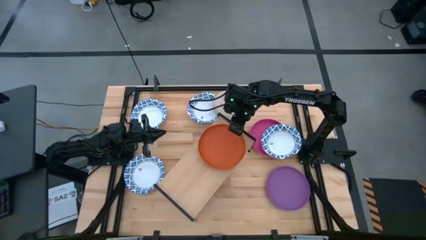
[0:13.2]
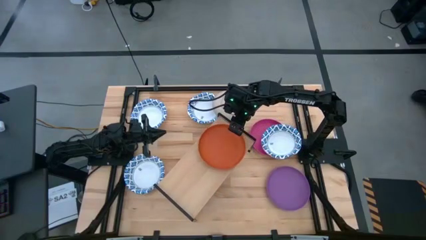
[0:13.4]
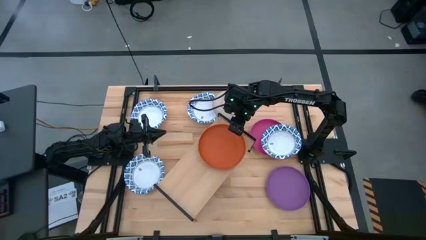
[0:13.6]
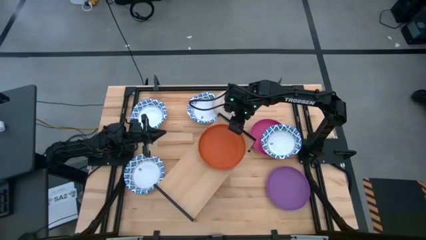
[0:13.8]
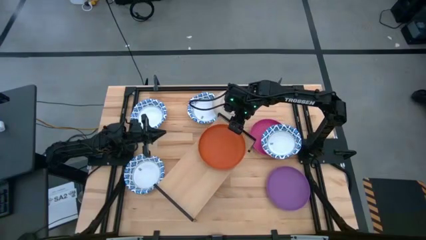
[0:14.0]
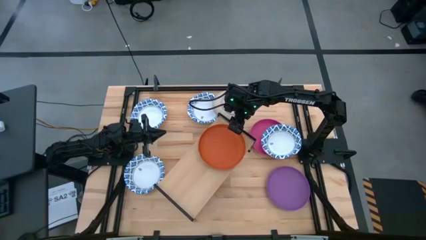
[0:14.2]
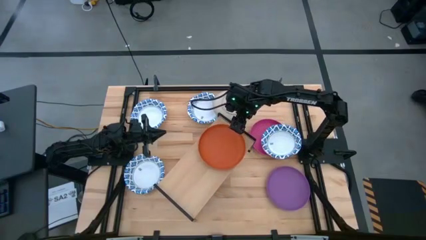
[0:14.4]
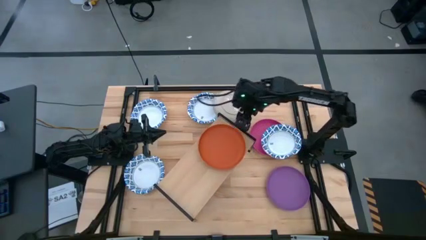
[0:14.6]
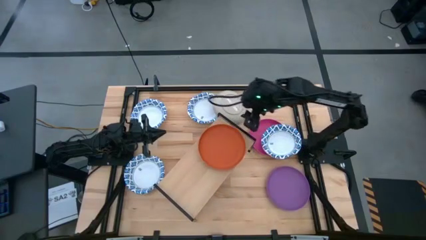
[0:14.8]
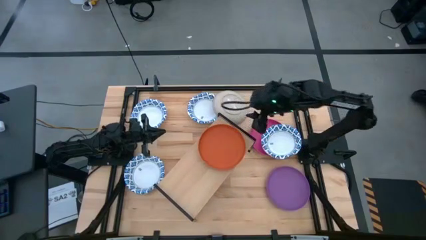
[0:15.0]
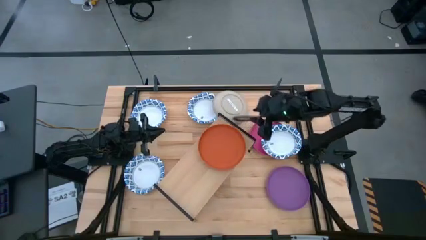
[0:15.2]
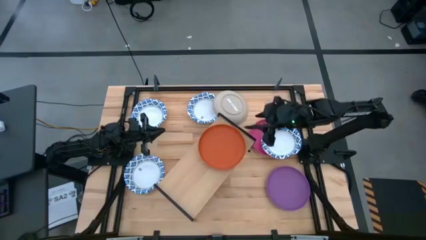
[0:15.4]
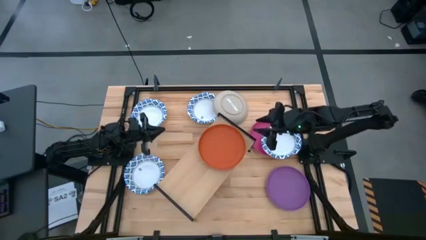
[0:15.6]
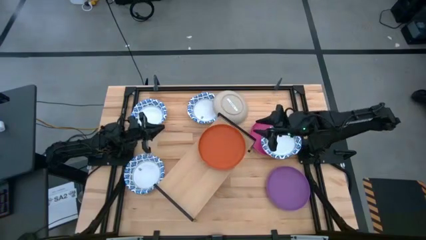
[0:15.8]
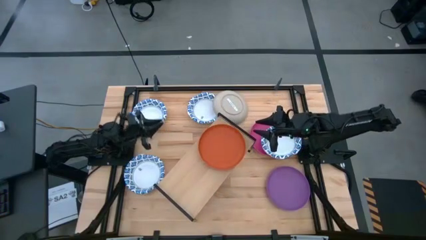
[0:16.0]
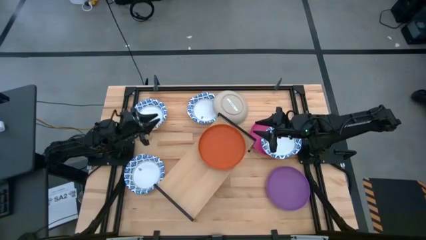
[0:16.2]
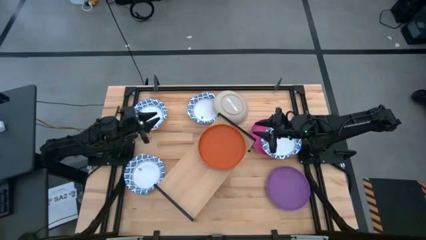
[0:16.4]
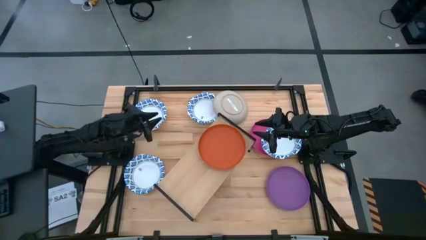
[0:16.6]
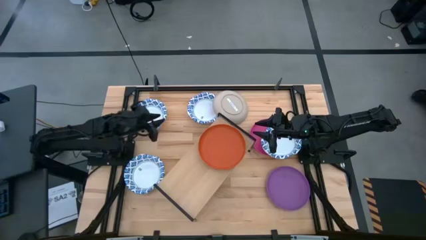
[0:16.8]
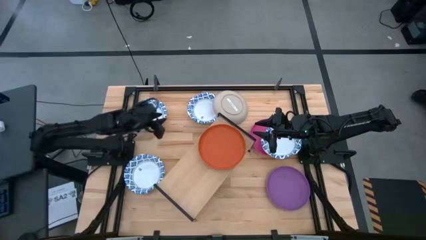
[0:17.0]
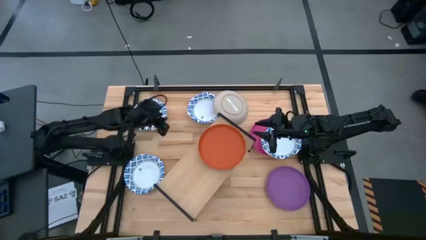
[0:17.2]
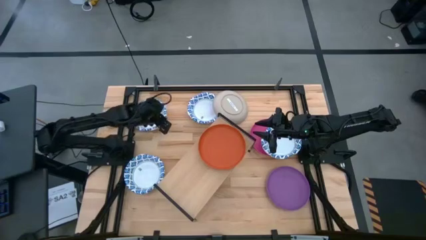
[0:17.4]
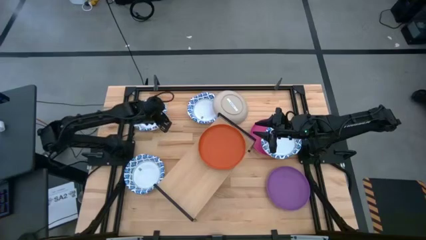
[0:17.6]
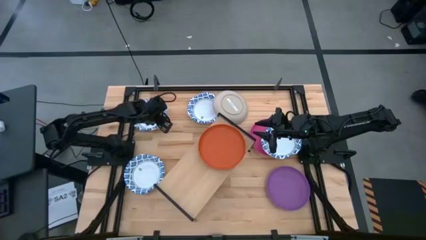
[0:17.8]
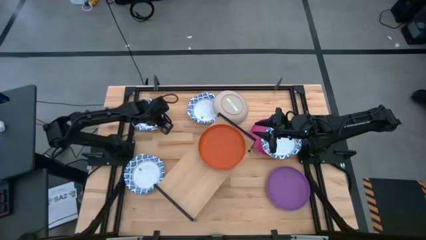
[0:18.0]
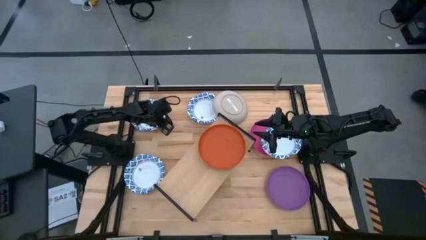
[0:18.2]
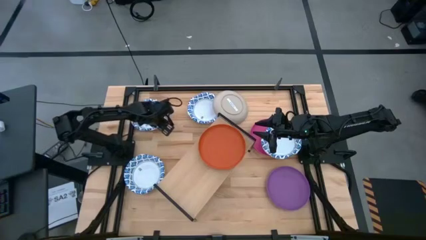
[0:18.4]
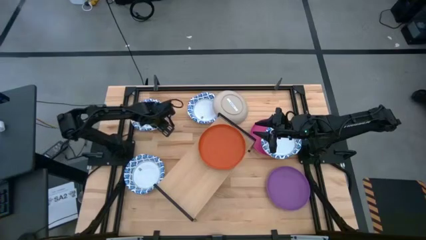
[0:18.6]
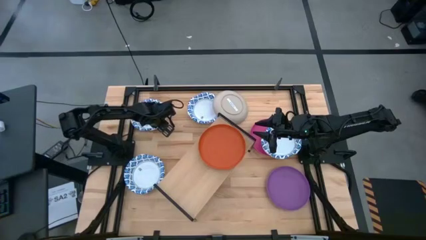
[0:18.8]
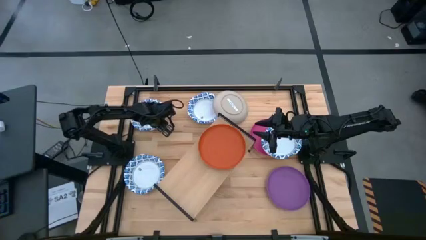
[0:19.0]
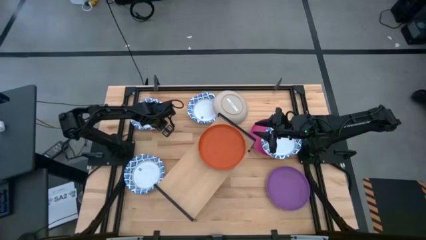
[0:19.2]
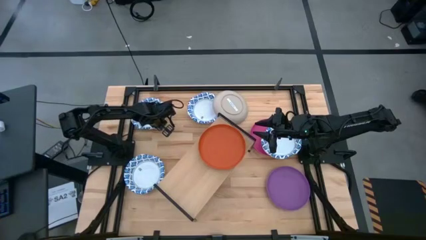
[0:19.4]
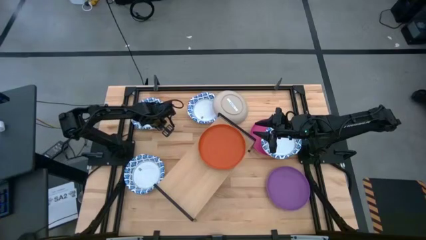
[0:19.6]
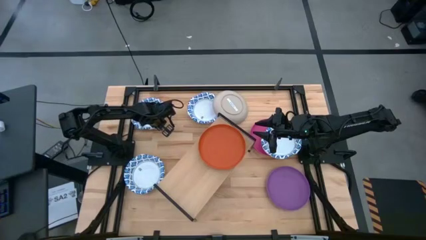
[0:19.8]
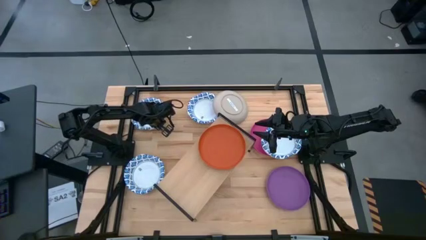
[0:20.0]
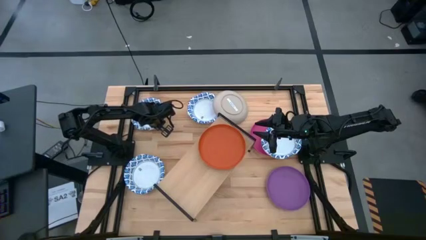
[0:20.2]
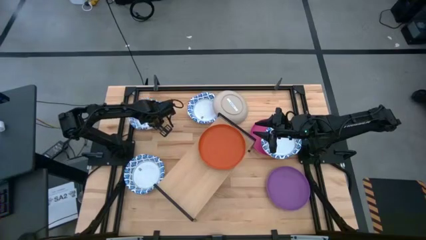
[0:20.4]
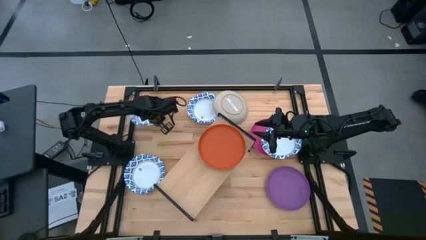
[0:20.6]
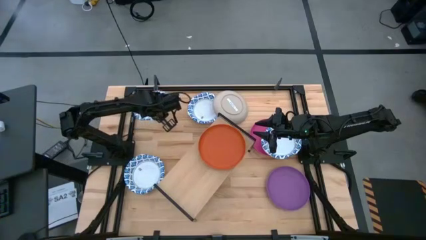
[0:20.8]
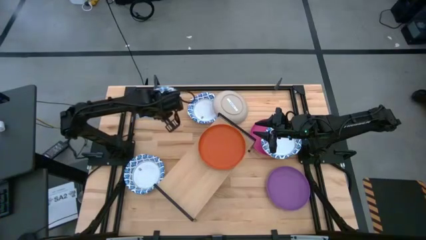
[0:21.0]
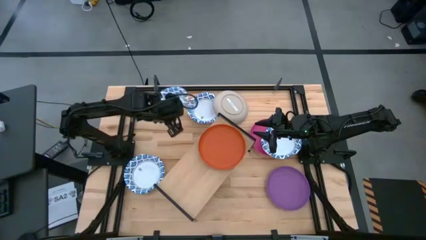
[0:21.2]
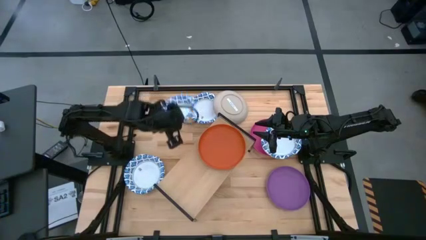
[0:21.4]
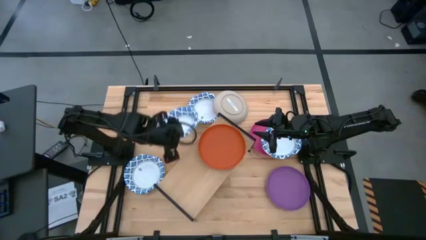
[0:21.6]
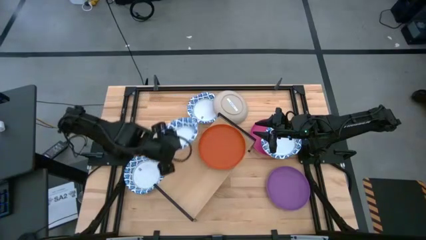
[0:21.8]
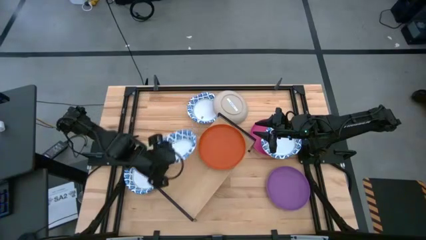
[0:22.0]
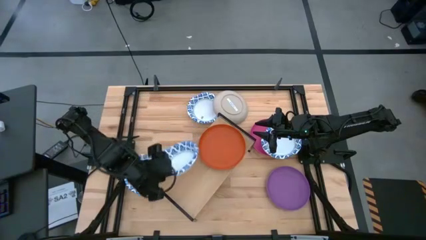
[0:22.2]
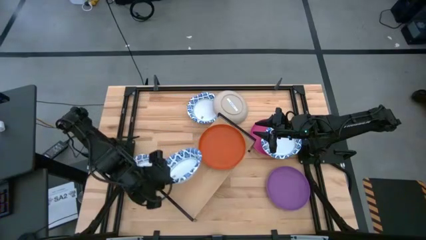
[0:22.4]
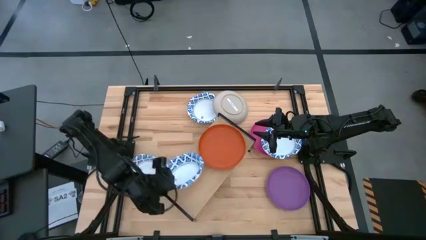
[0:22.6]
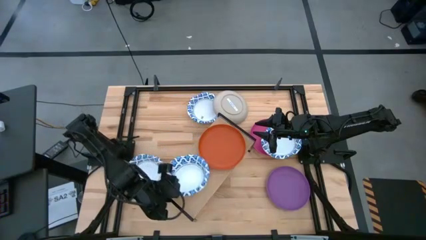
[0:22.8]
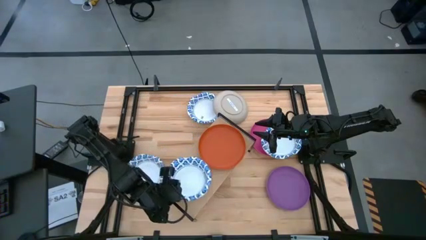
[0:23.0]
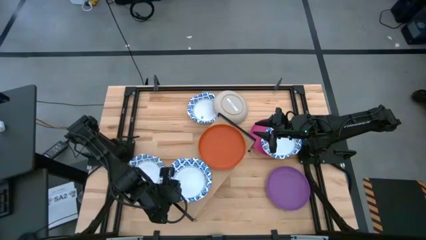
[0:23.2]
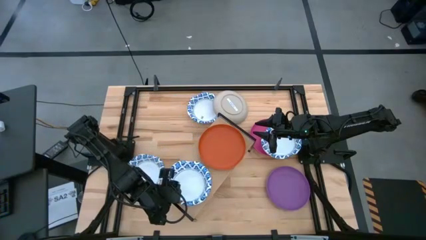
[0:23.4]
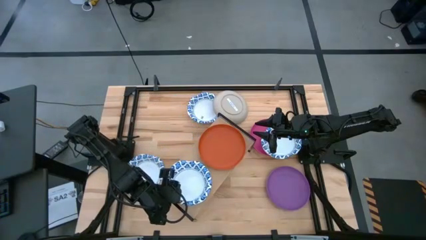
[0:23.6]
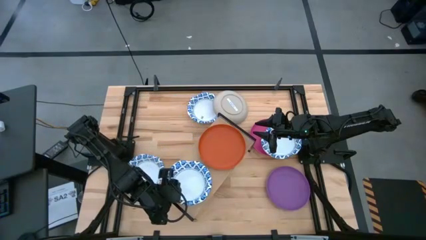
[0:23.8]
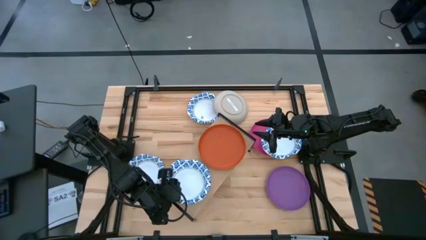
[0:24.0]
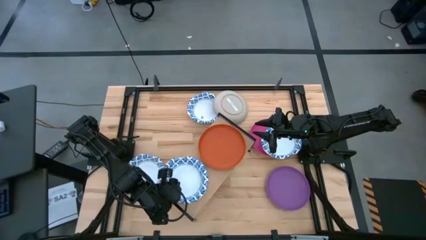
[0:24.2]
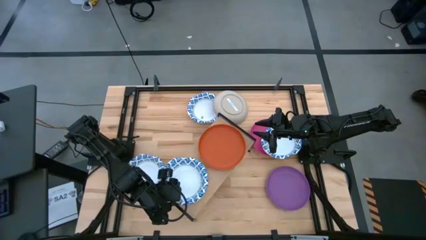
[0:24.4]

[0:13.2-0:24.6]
Task: Place and stack plates onto a shelf
Put the white blue patterned plate on the shelf
